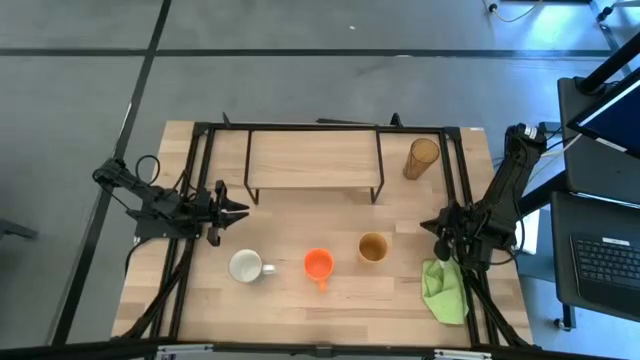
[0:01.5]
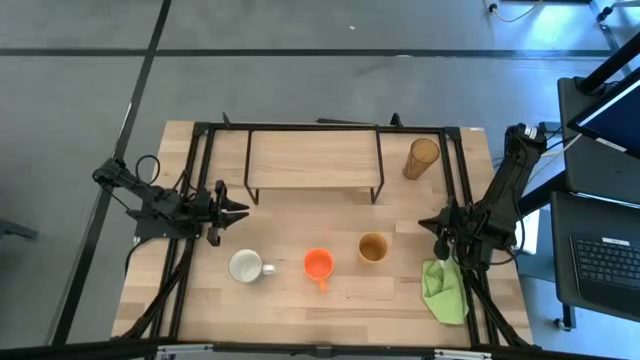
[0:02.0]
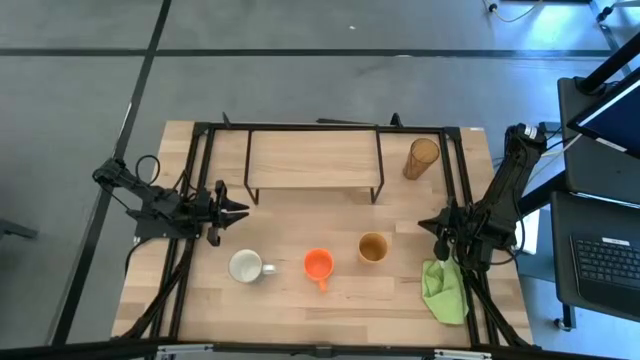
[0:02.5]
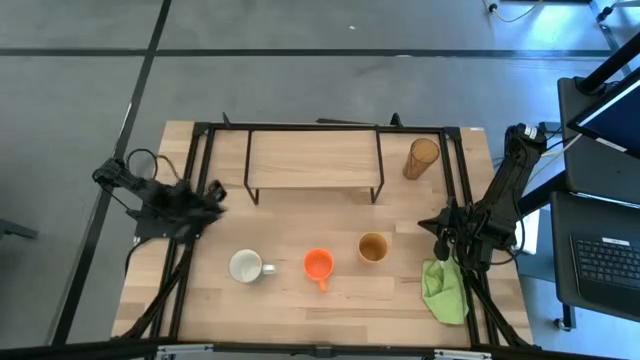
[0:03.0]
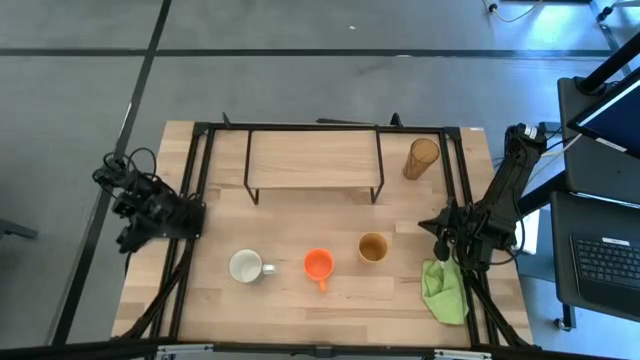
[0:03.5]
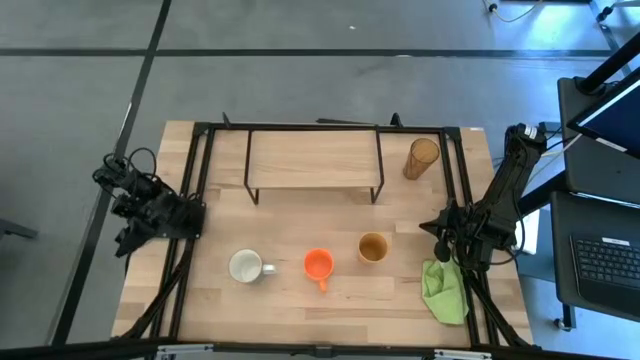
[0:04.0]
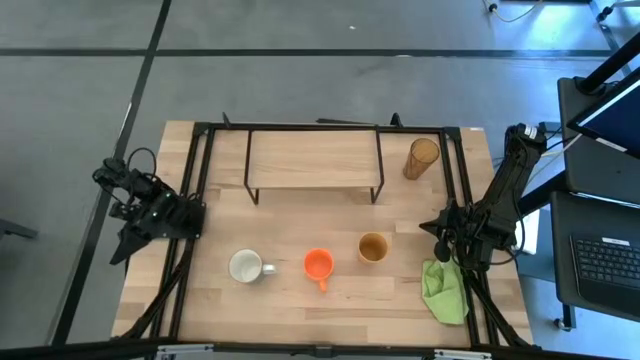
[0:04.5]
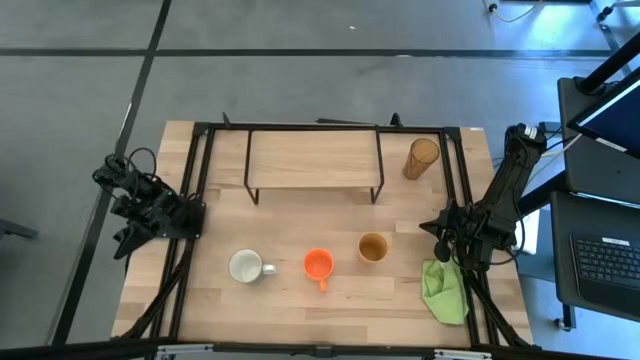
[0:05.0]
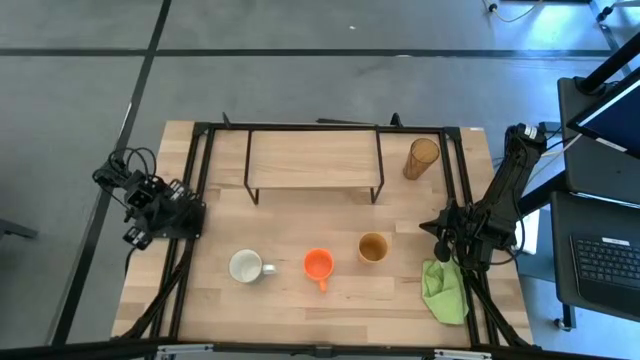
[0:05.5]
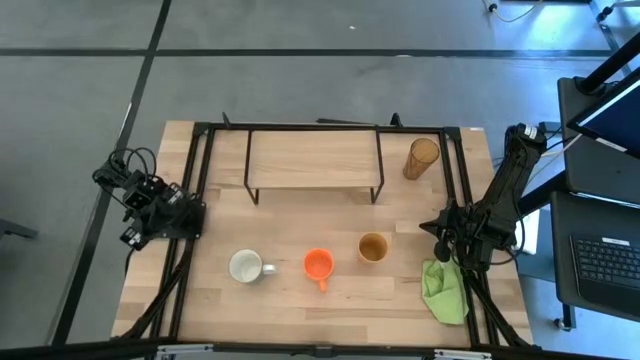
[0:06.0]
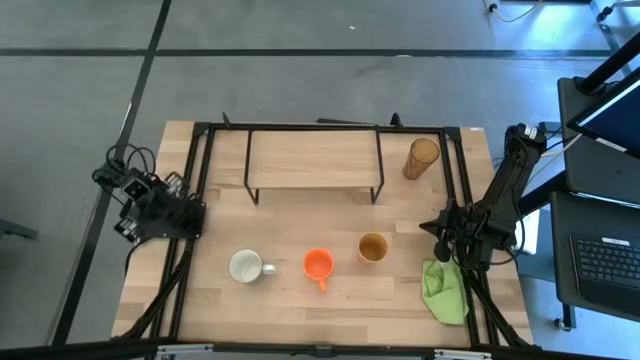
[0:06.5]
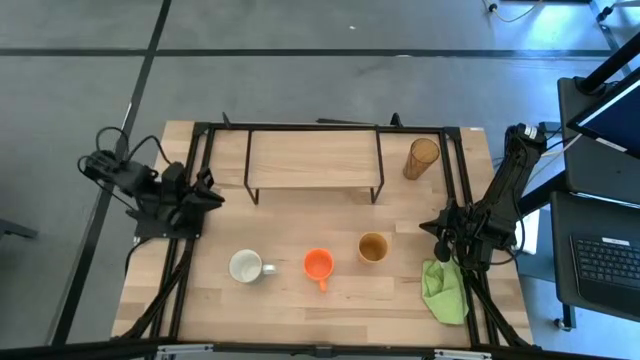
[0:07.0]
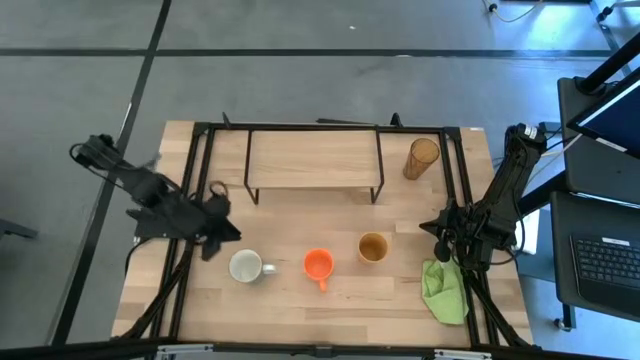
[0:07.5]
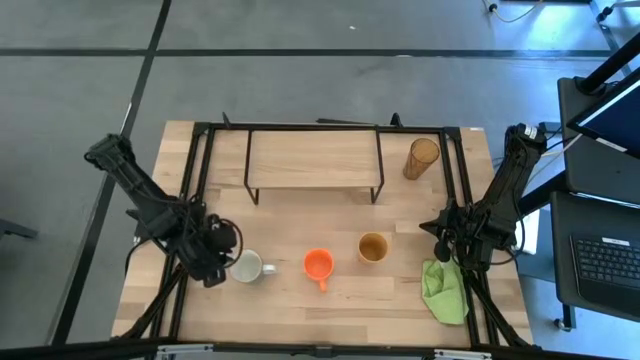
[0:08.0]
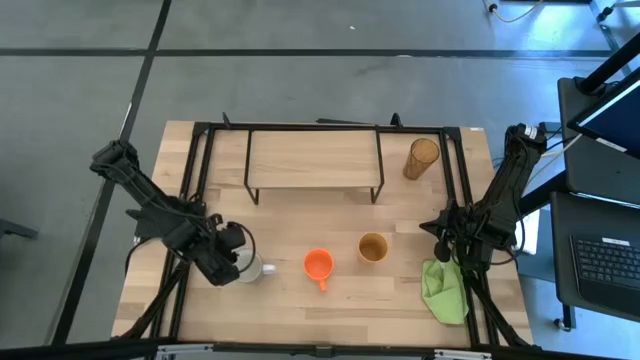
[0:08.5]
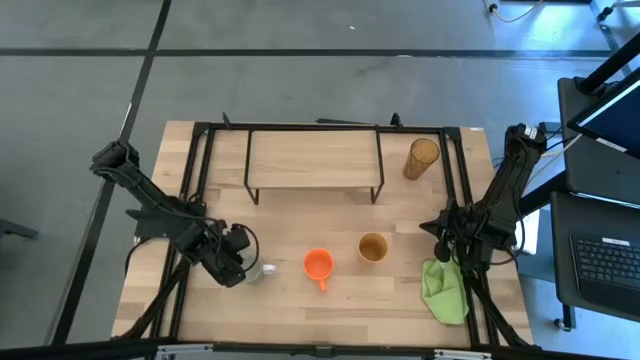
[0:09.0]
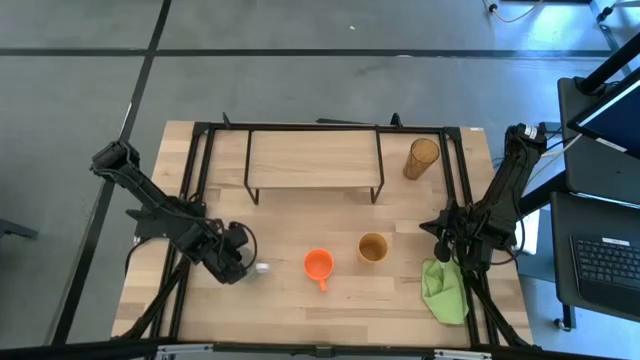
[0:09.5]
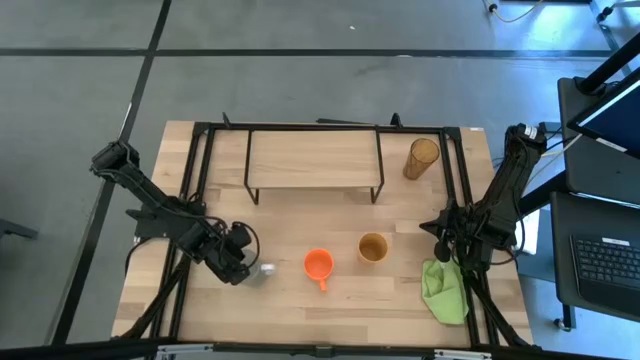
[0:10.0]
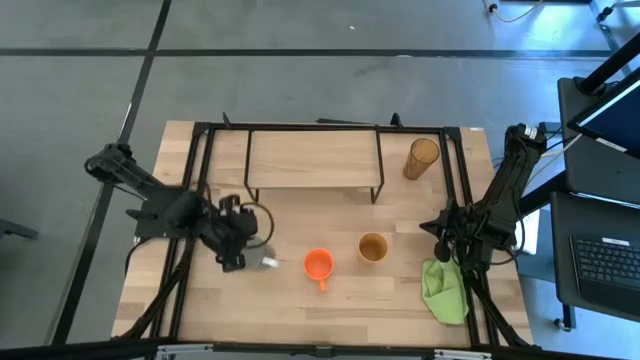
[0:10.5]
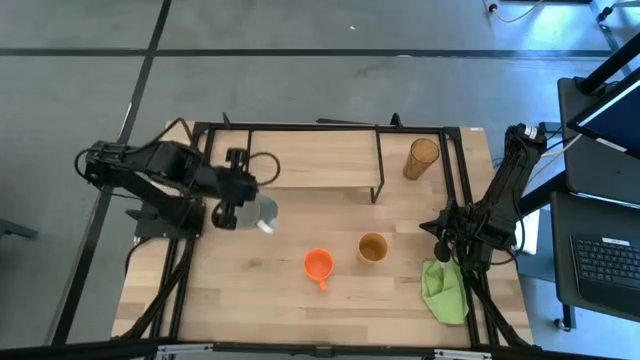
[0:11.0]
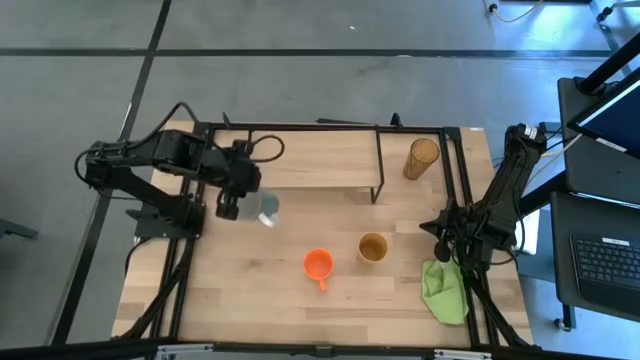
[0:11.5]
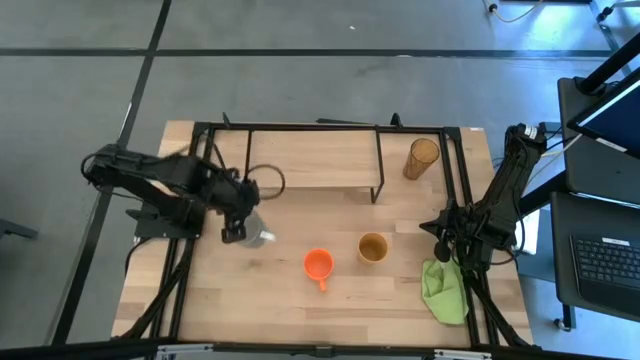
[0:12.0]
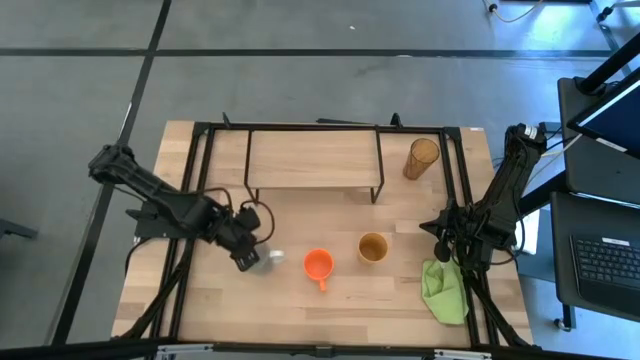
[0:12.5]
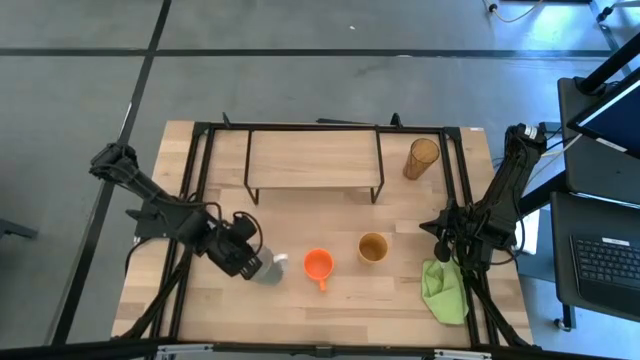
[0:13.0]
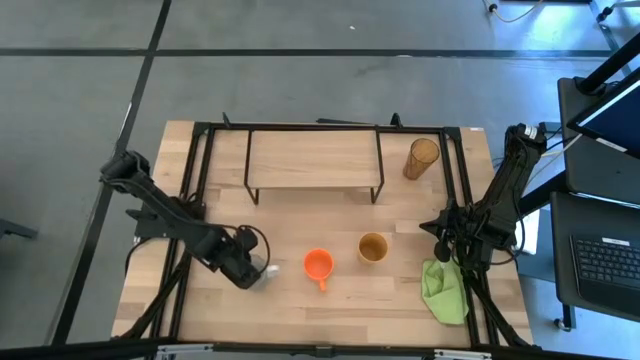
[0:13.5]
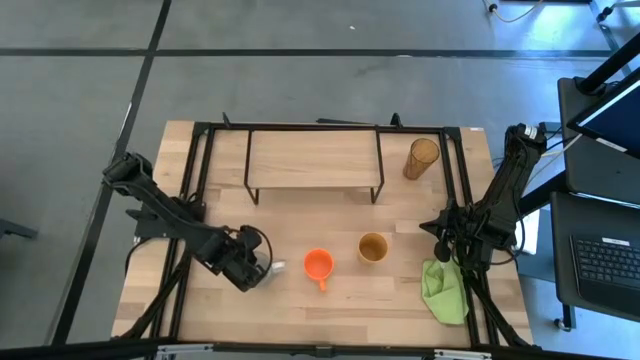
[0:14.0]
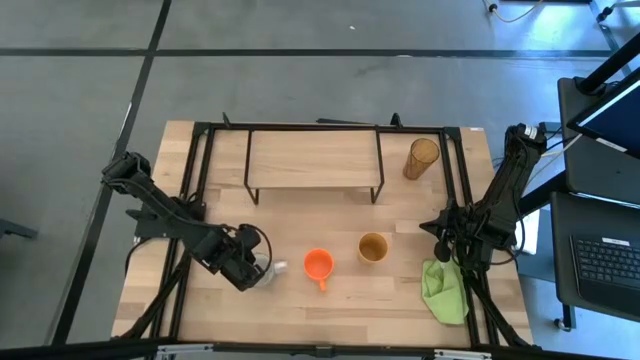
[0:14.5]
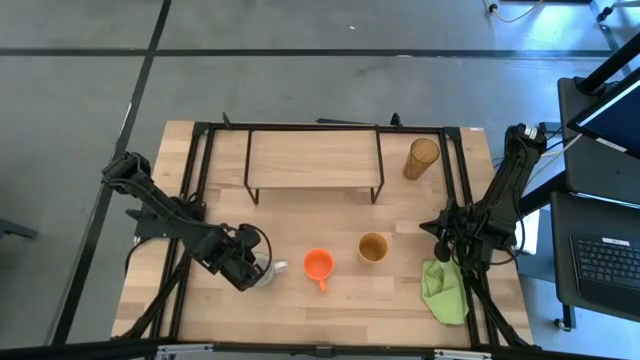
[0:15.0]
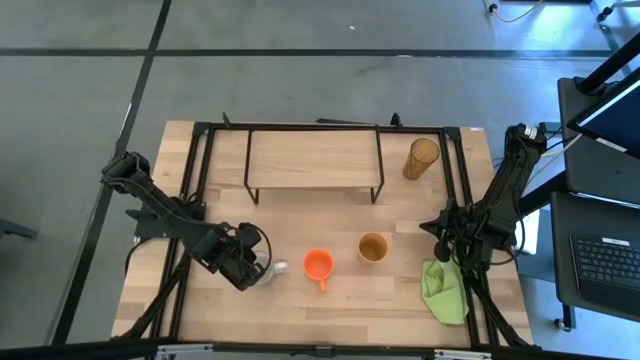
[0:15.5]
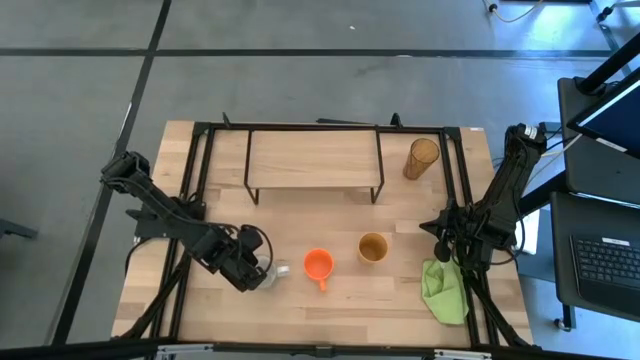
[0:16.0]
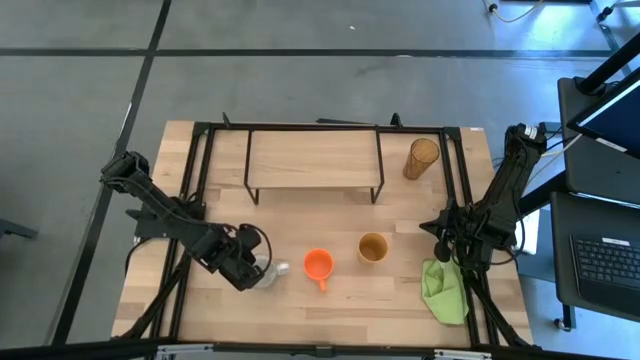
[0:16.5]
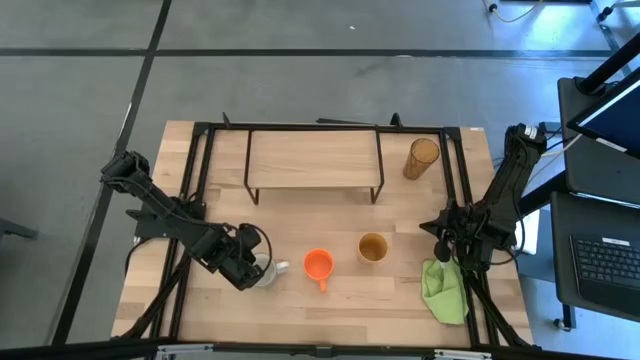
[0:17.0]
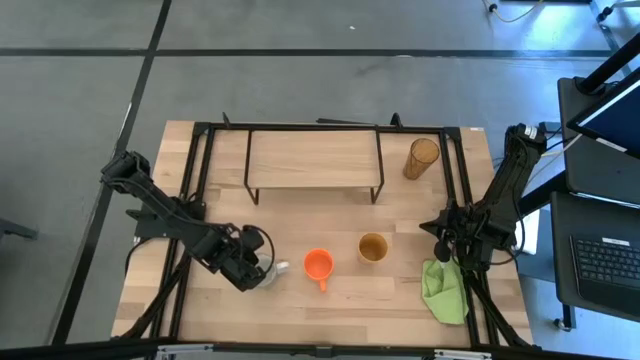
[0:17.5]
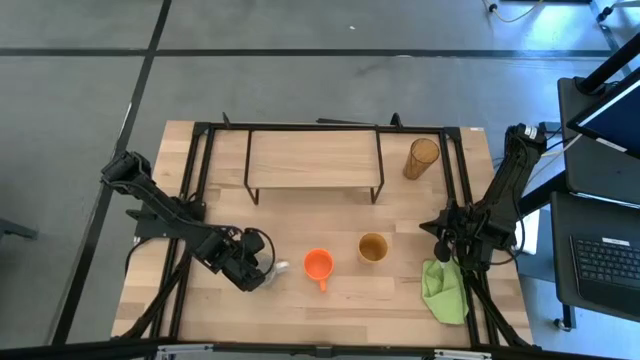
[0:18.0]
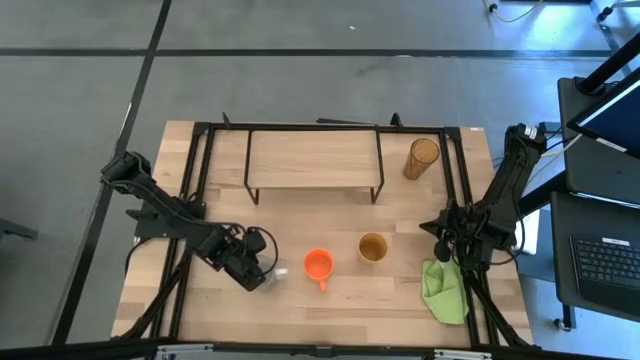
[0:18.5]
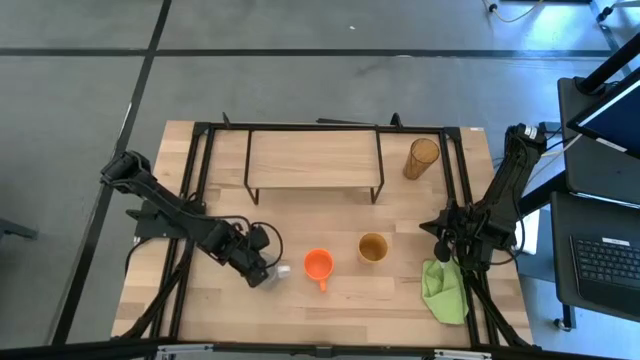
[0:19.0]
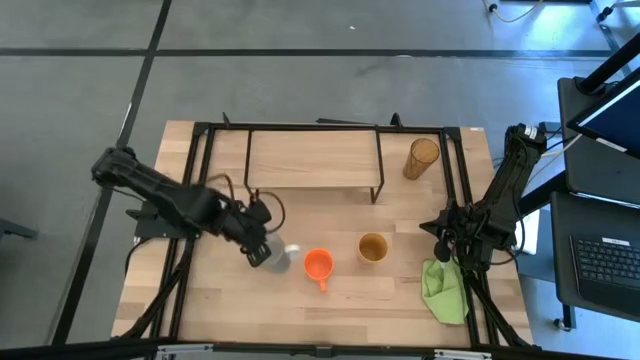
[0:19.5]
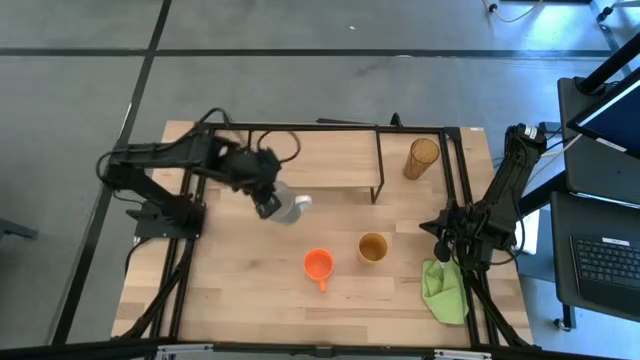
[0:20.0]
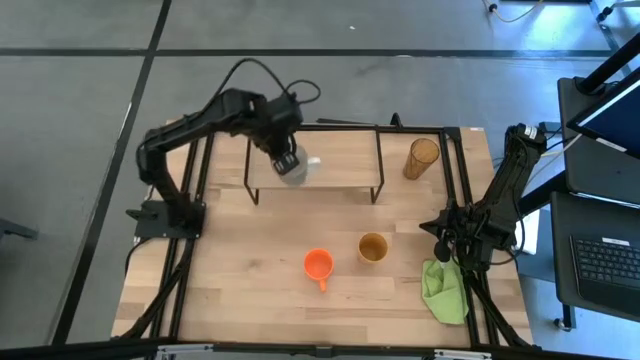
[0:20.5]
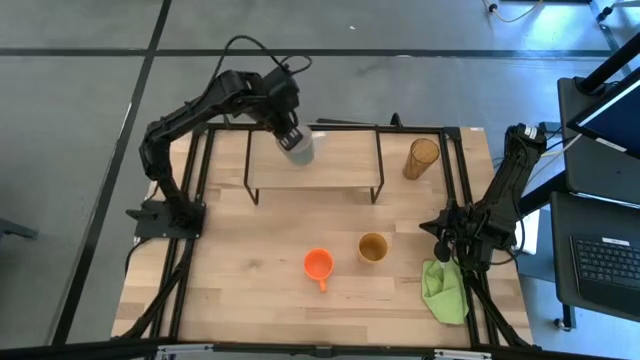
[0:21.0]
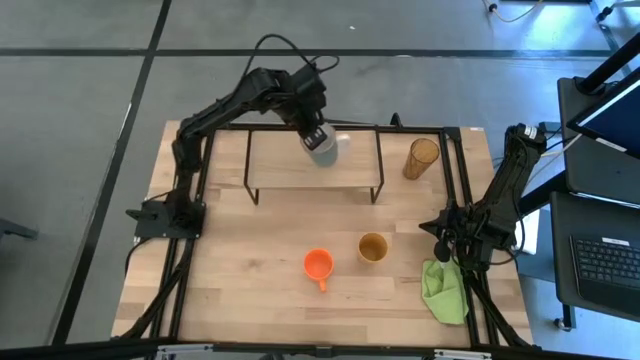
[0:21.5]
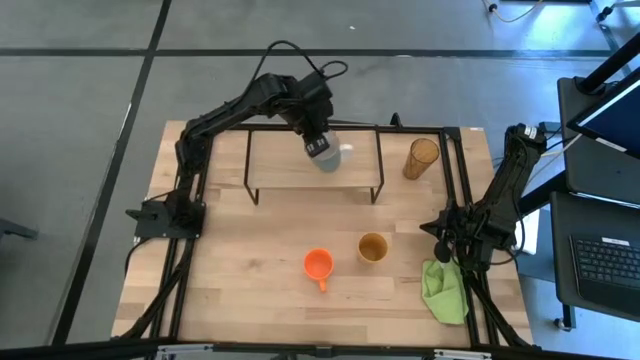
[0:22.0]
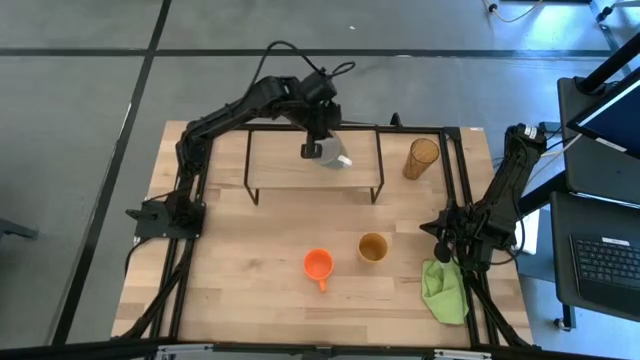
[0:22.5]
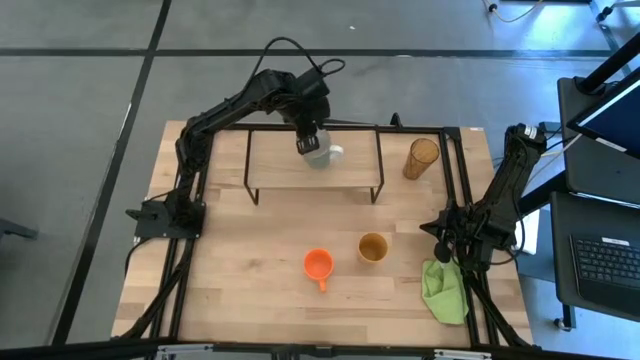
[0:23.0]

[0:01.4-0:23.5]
Task: Stack small to large cups/mugs on shelf
Put the blue mug on the shelf
